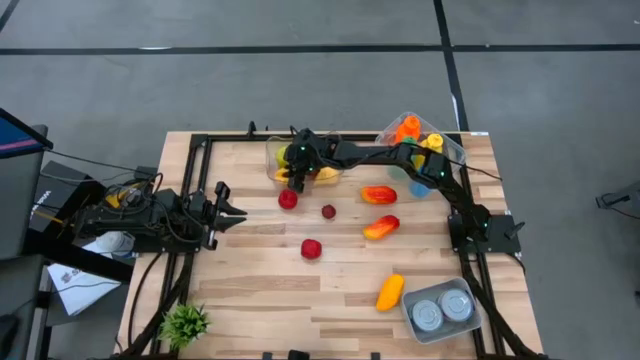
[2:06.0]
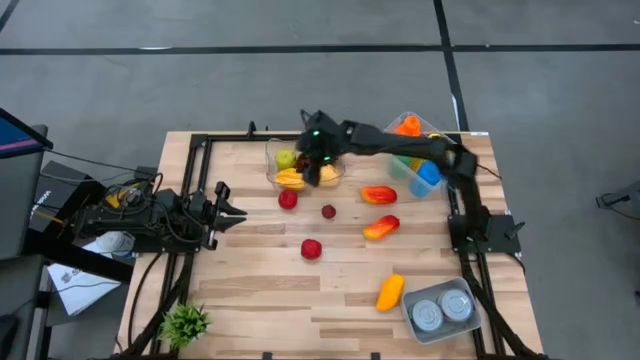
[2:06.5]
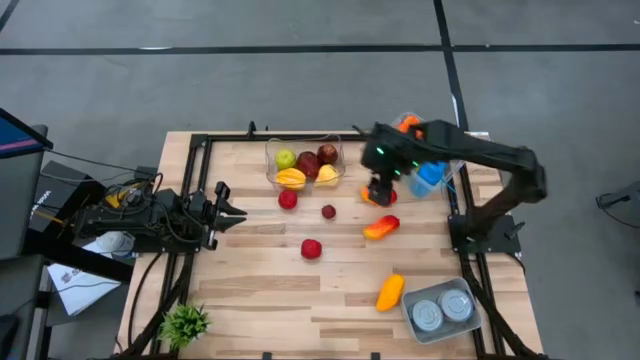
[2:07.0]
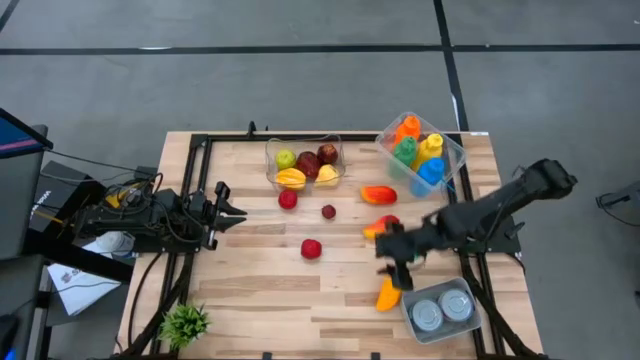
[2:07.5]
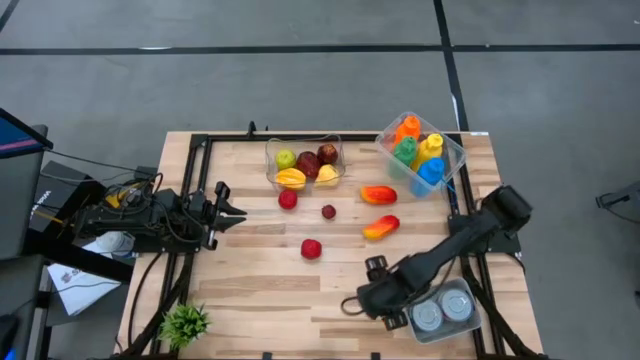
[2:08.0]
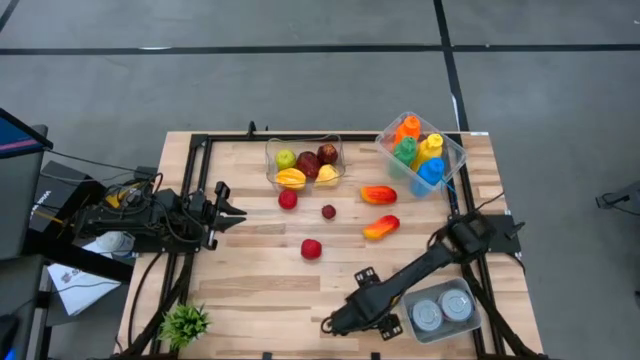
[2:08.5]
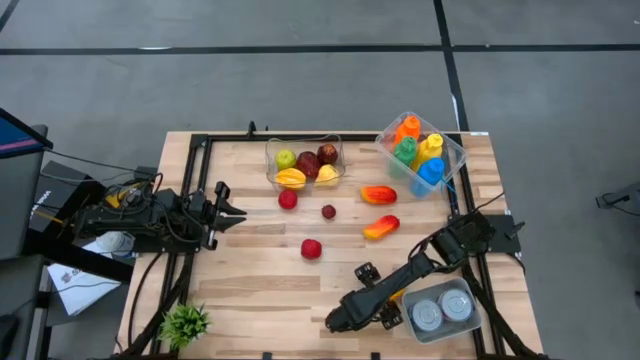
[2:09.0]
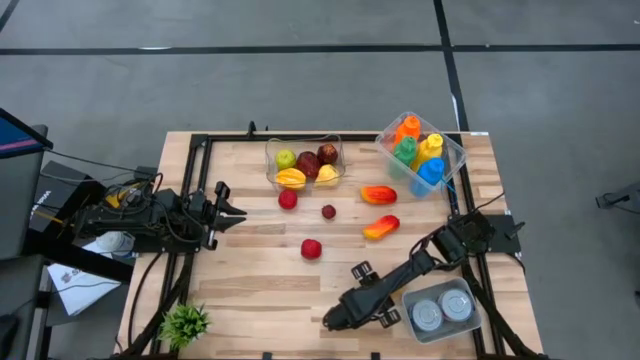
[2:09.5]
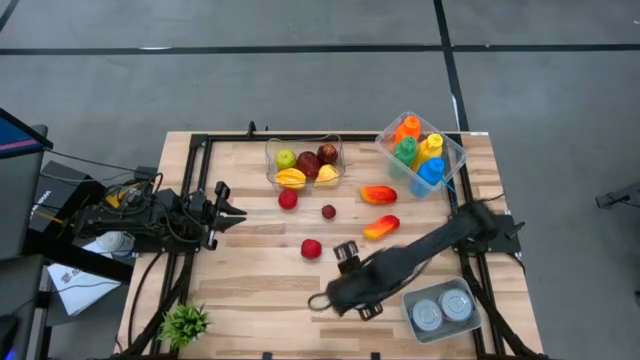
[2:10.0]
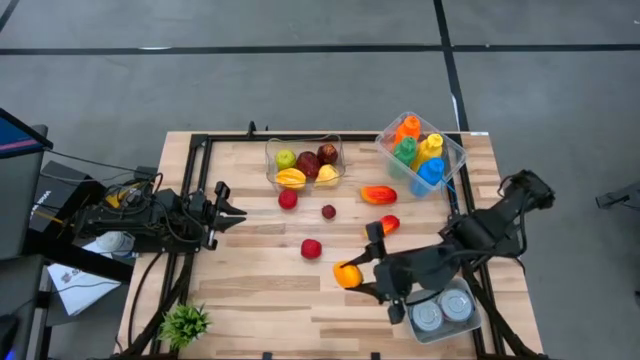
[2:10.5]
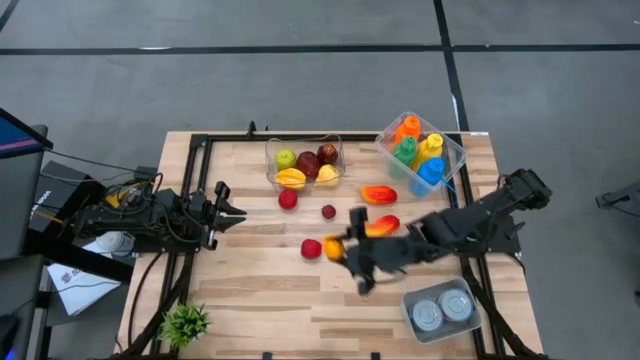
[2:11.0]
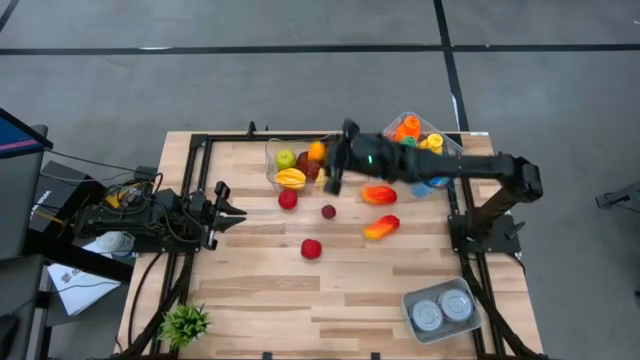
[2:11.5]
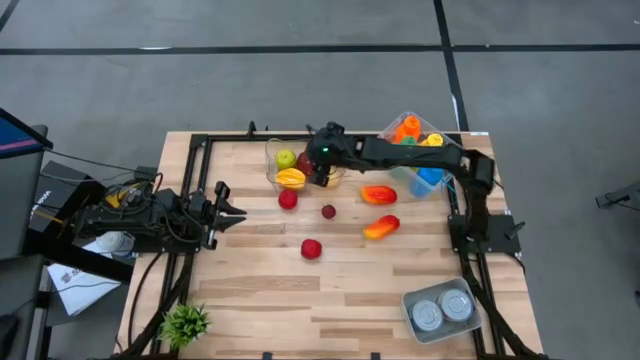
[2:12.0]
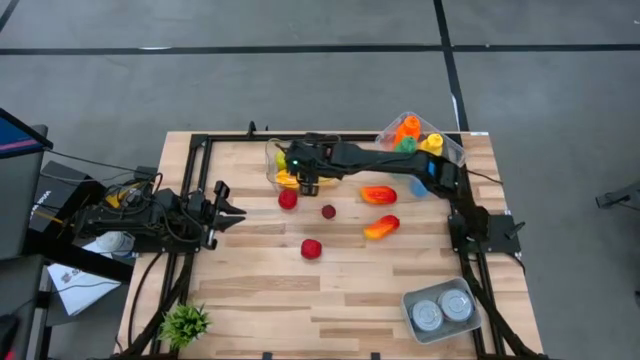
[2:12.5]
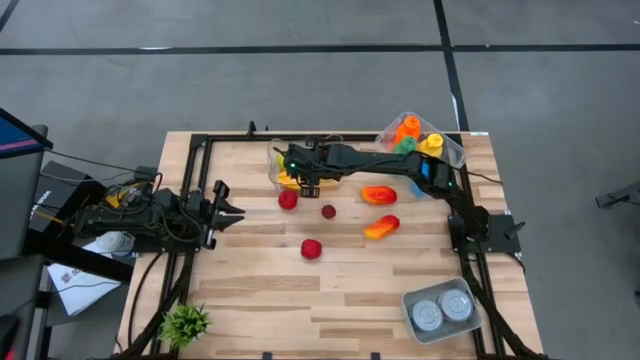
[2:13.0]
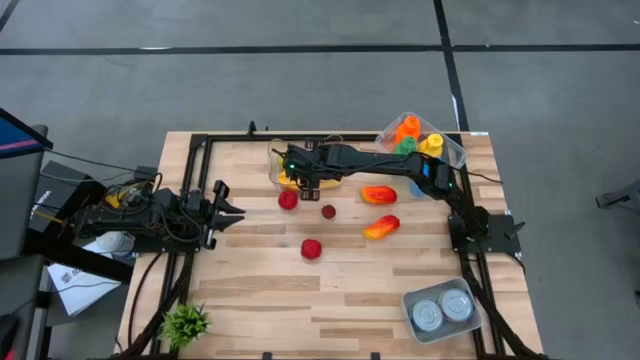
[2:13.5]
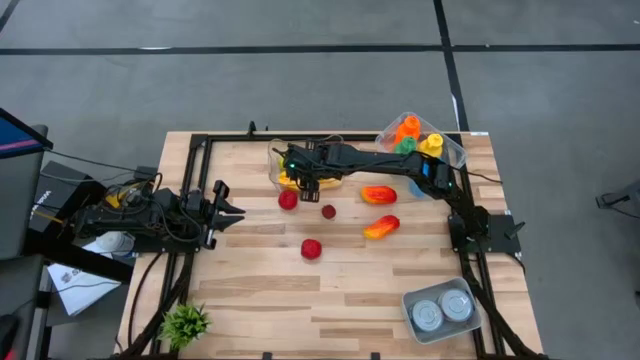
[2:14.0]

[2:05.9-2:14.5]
Task: Pick & Place Food Item
Put the yellow mango into the transparent bin

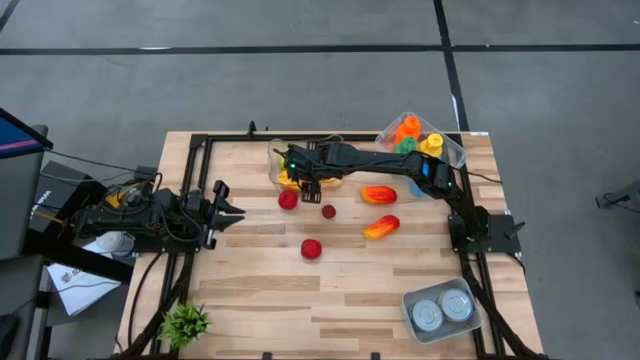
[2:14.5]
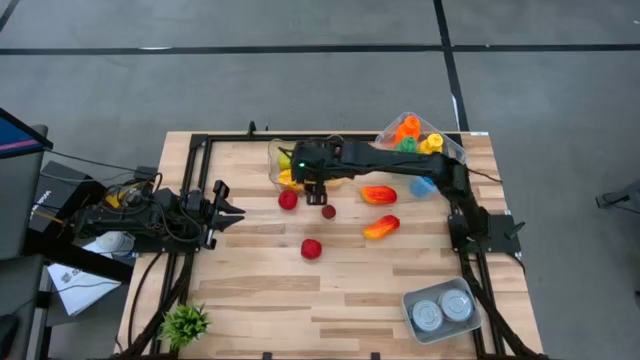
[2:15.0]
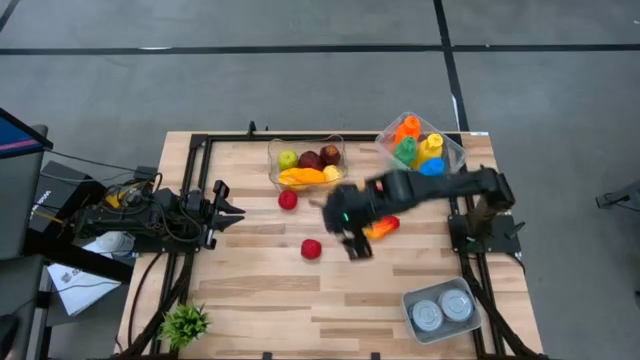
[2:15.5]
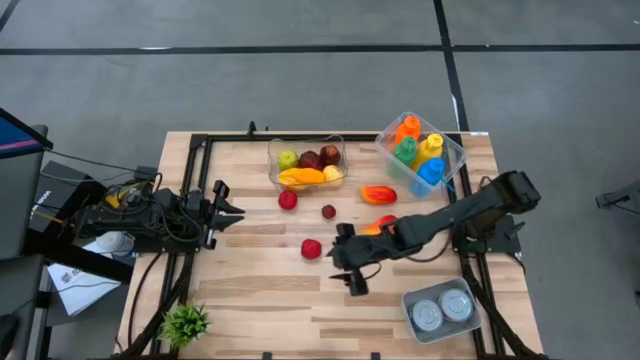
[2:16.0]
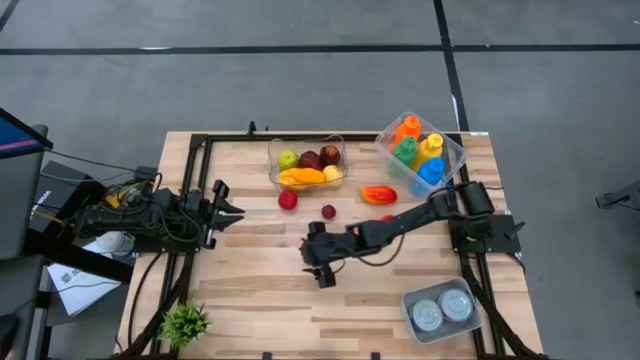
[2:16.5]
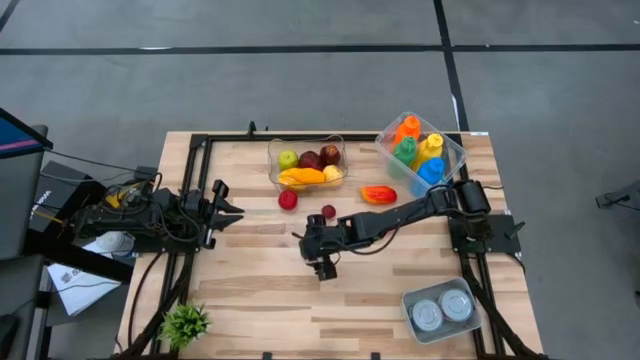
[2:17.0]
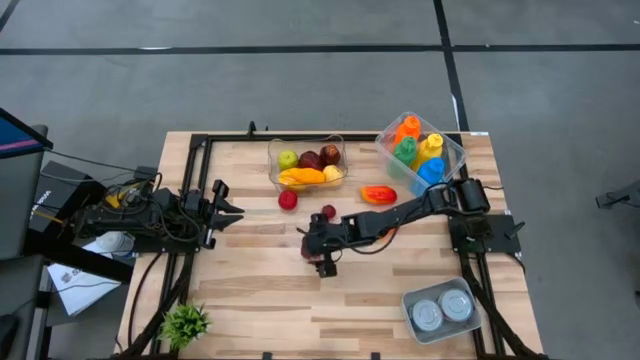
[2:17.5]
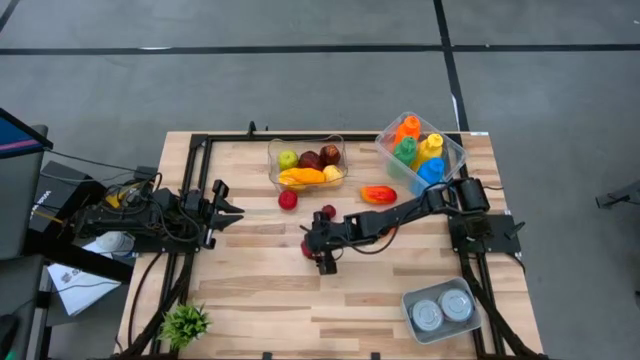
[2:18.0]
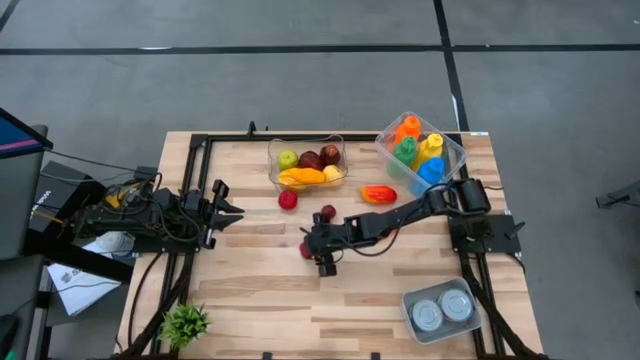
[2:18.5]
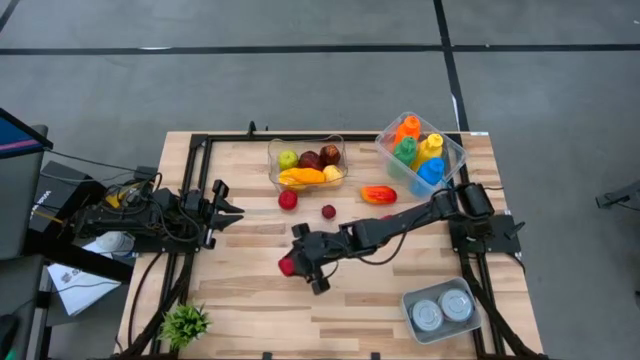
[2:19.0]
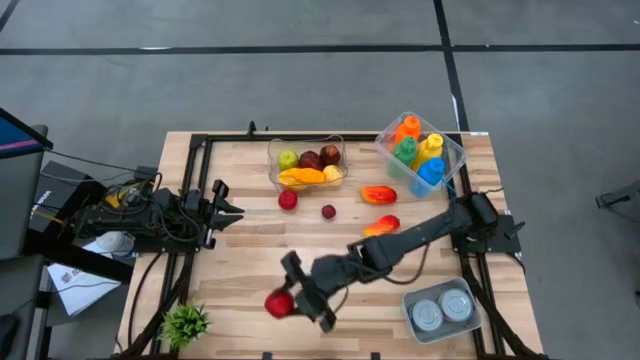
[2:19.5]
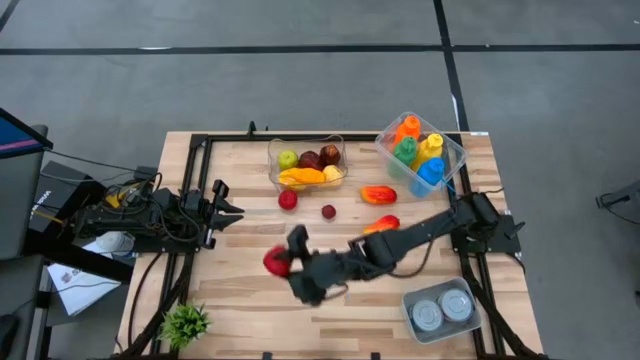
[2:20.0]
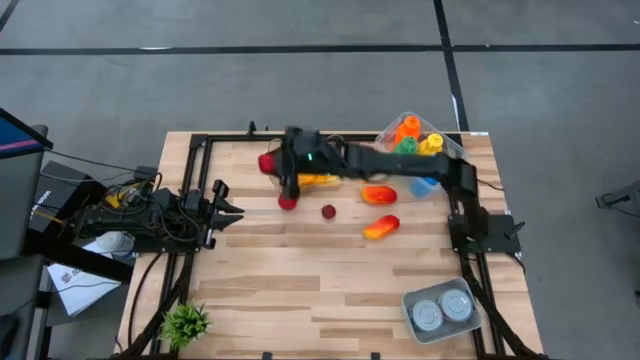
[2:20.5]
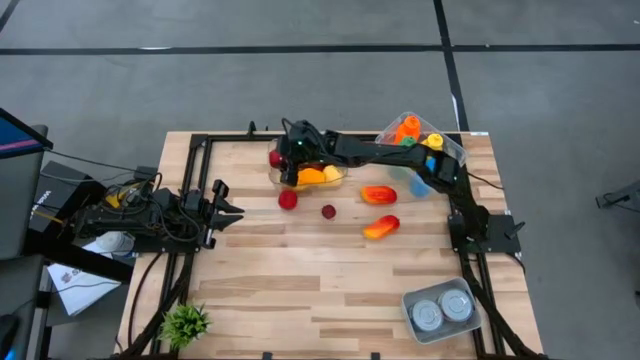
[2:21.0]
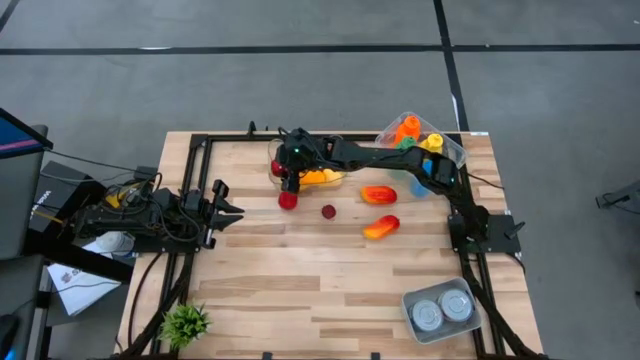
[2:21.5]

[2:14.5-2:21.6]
Put the bottom red tomato into the transparent bin

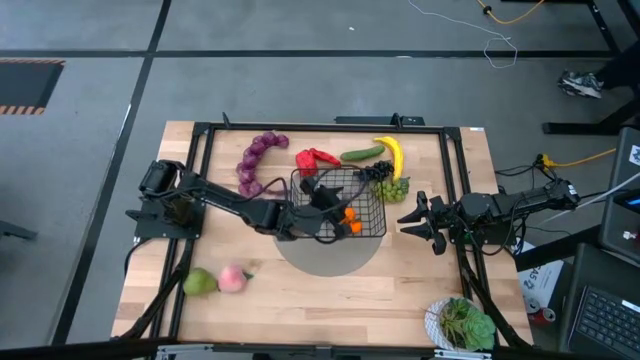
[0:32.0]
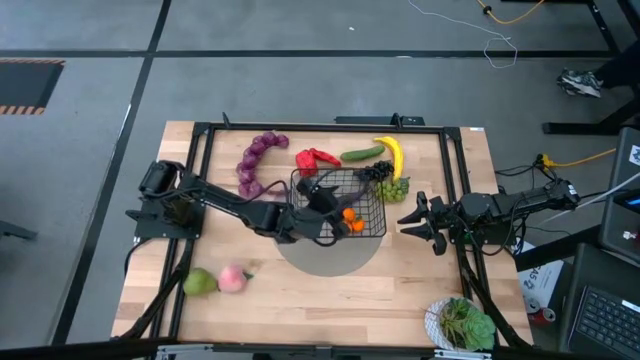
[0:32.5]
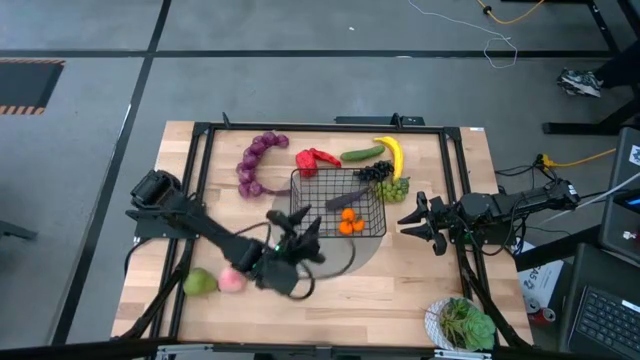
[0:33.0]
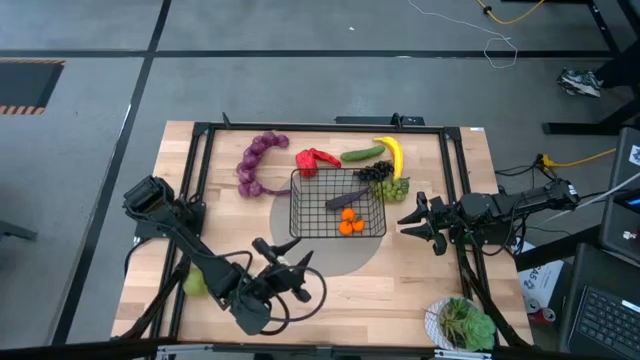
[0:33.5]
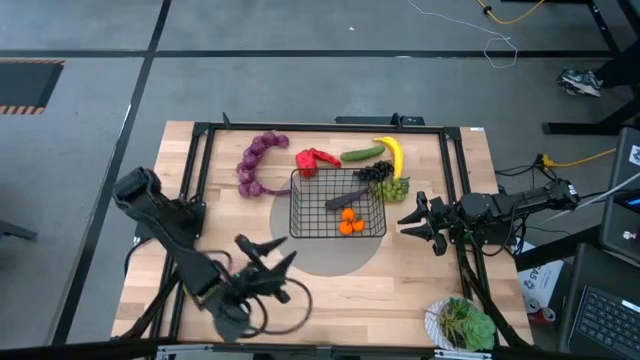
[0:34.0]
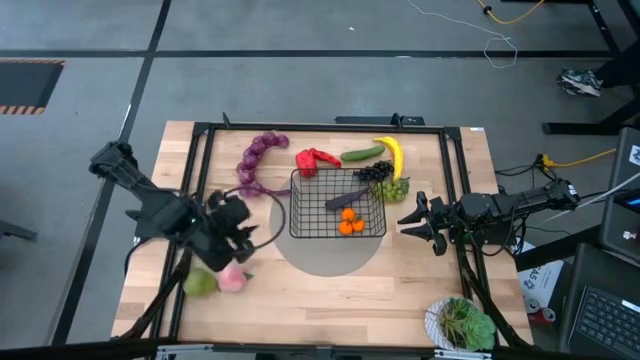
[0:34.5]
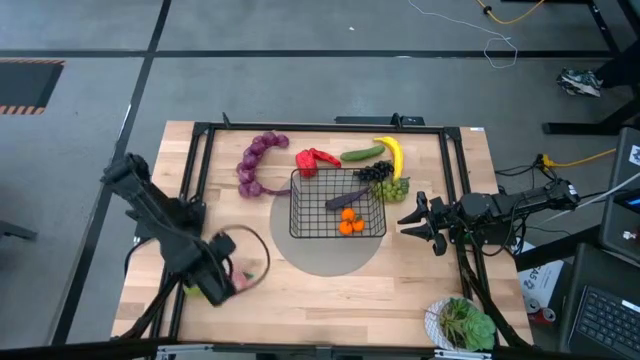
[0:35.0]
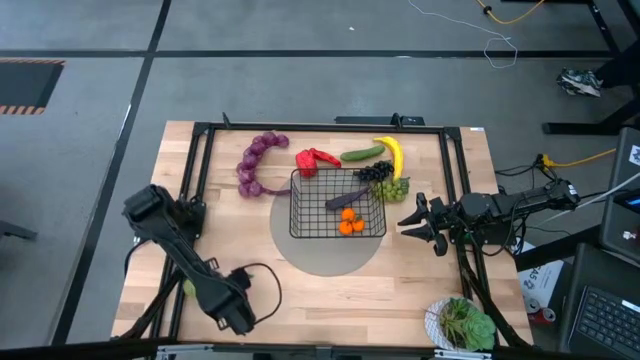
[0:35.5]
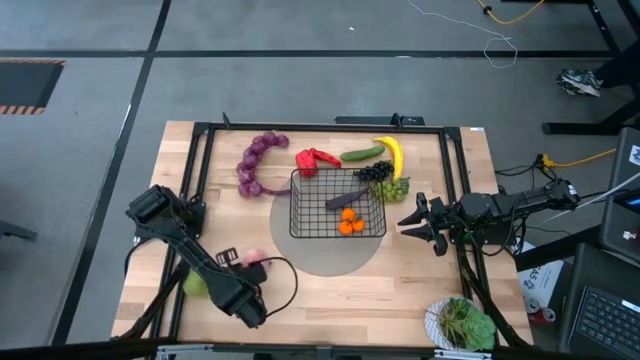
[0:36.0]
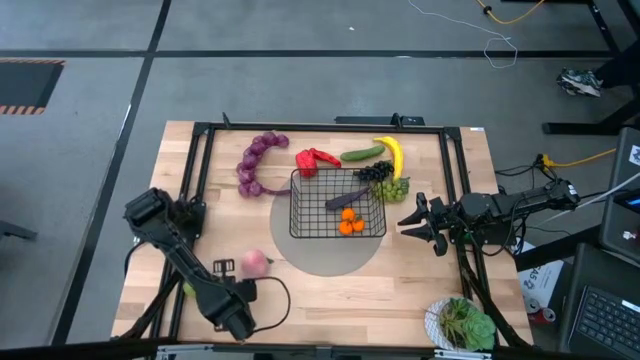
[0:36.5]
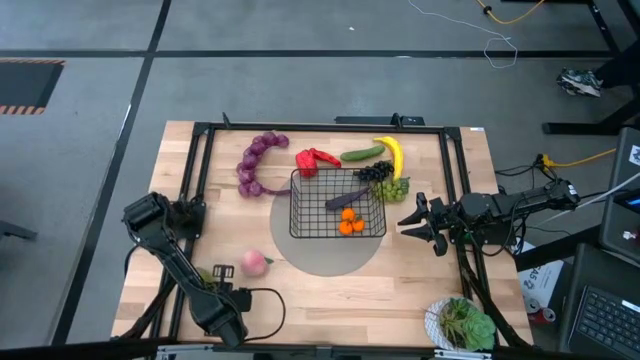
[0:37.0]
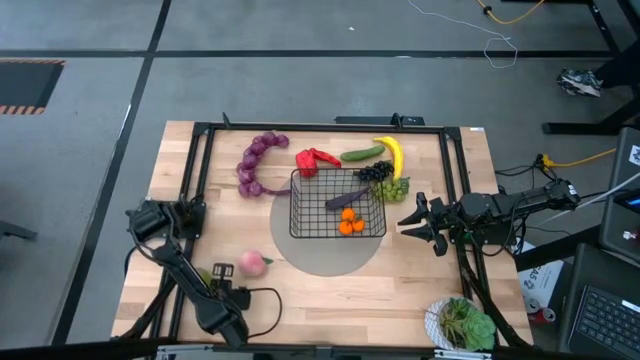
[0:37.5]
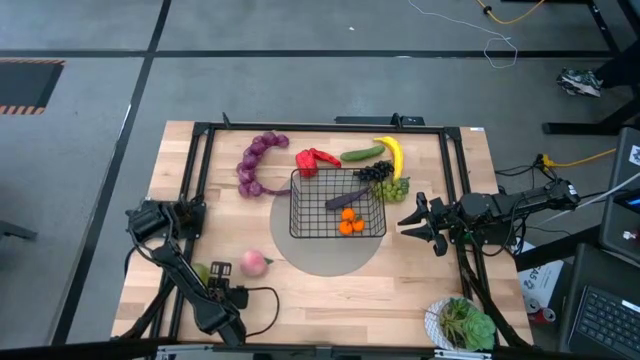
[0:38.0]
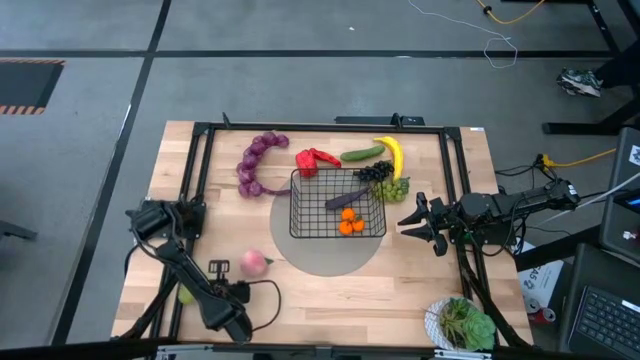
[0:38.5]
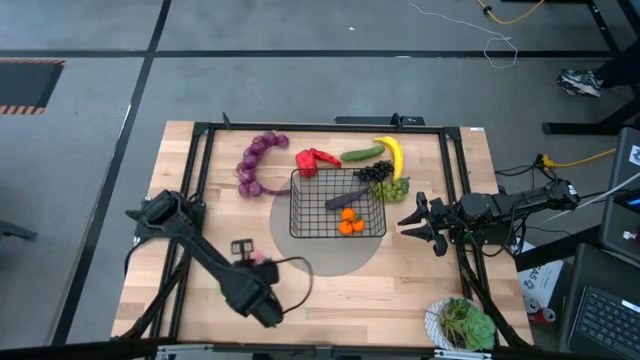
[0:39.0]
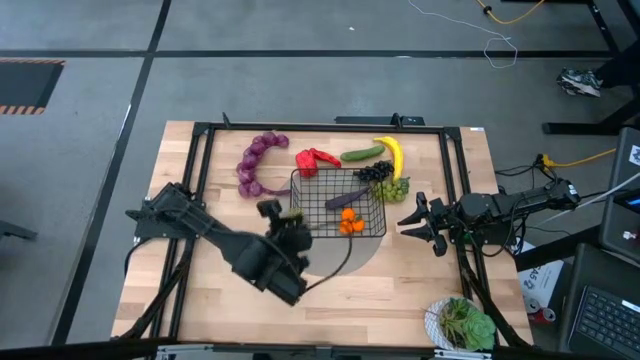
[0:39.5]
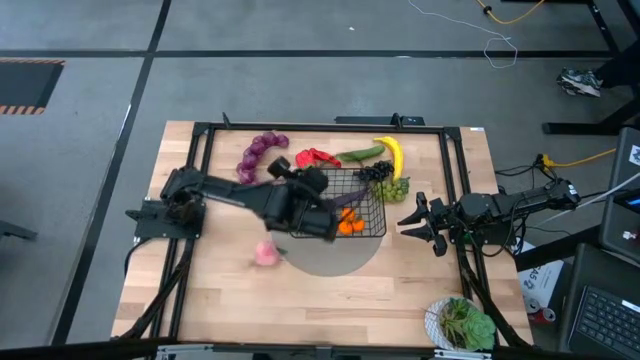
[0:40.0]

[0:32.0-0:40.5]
Task: Build produce basket
Put the pear into the wire basket
